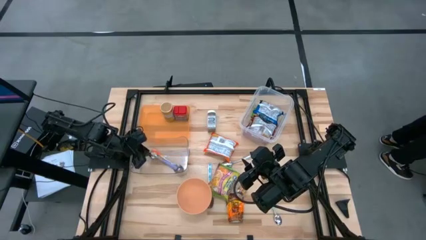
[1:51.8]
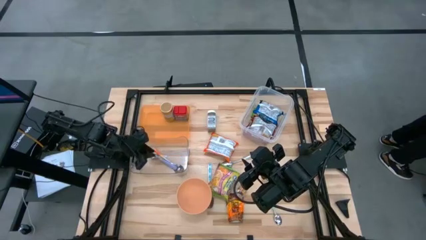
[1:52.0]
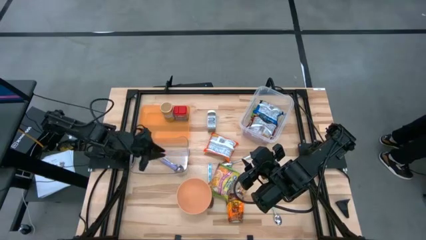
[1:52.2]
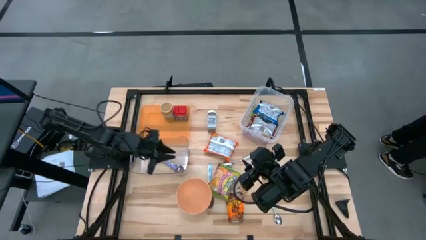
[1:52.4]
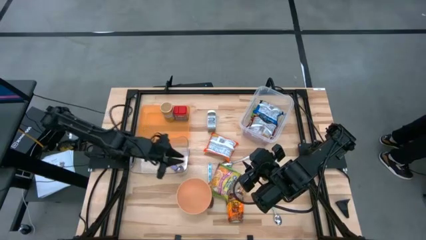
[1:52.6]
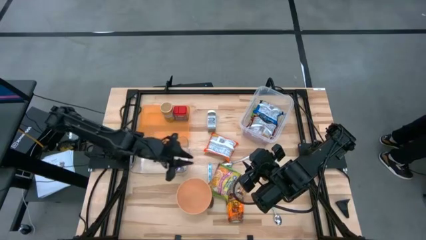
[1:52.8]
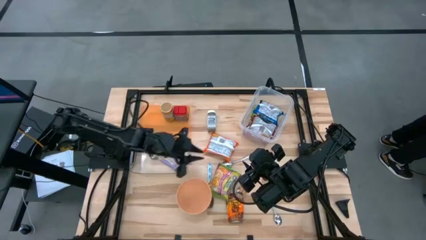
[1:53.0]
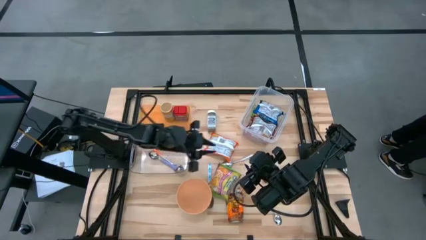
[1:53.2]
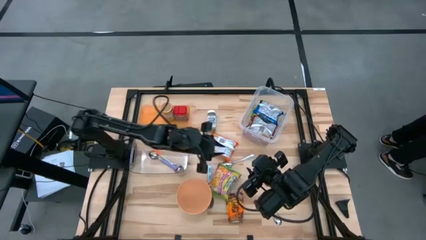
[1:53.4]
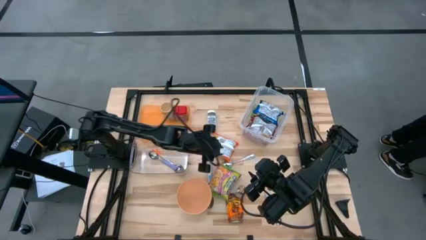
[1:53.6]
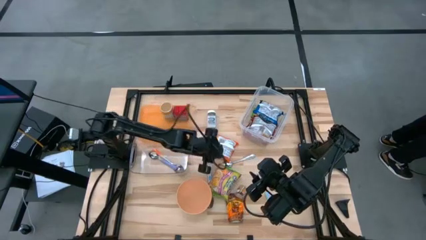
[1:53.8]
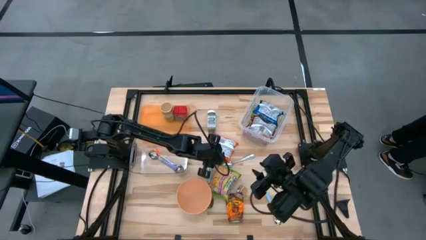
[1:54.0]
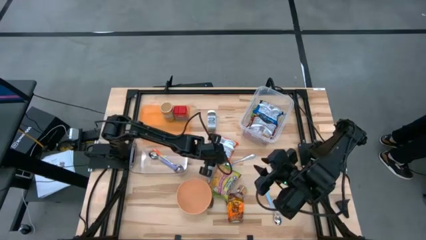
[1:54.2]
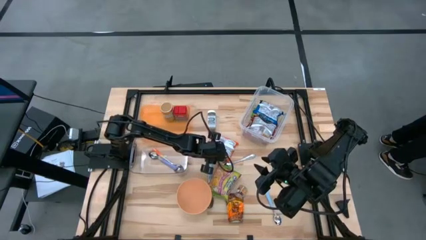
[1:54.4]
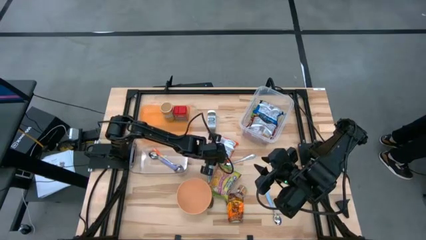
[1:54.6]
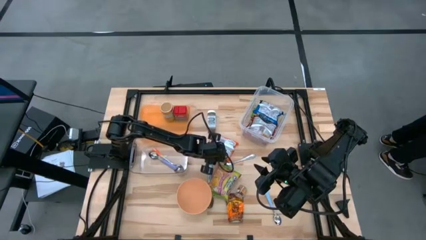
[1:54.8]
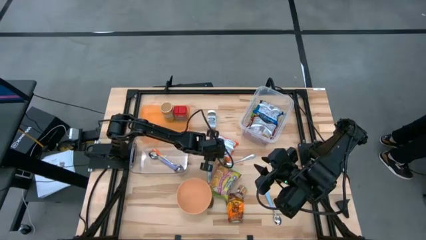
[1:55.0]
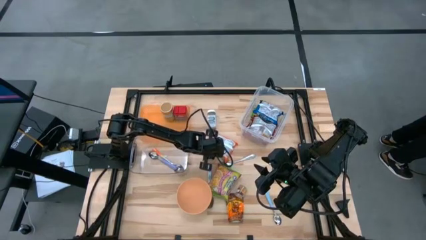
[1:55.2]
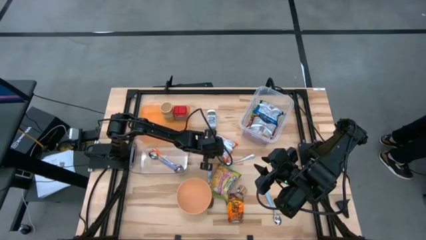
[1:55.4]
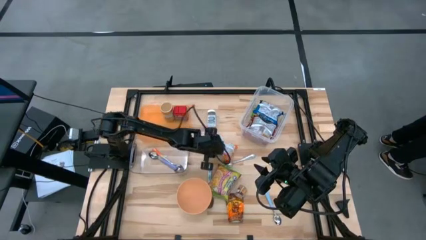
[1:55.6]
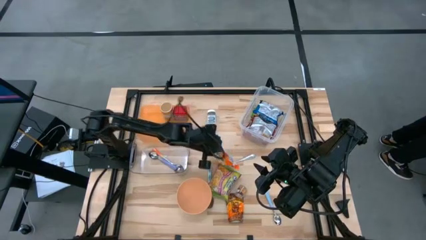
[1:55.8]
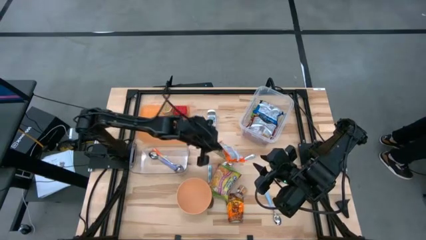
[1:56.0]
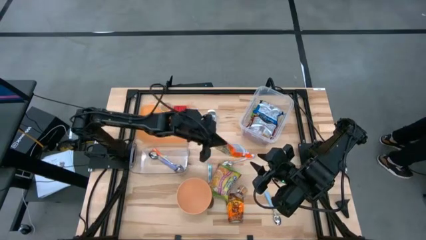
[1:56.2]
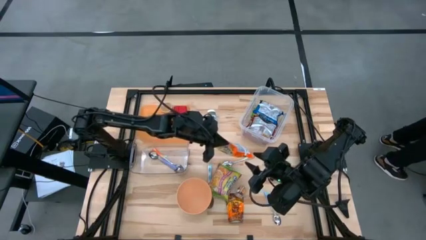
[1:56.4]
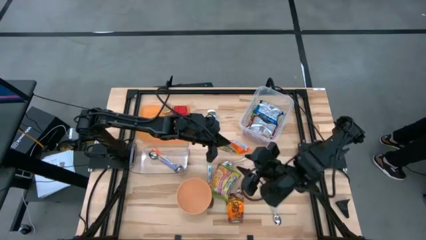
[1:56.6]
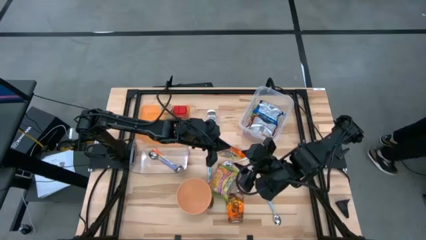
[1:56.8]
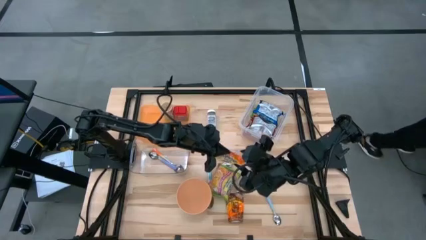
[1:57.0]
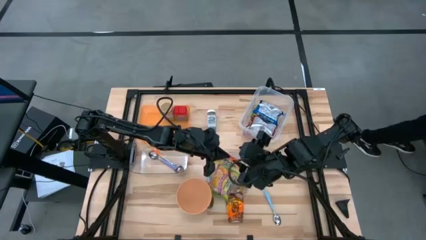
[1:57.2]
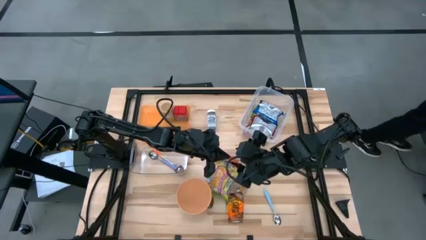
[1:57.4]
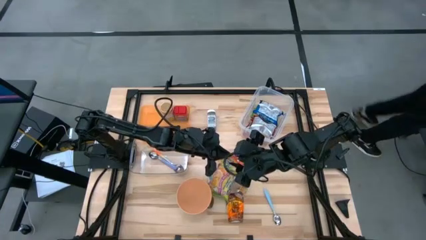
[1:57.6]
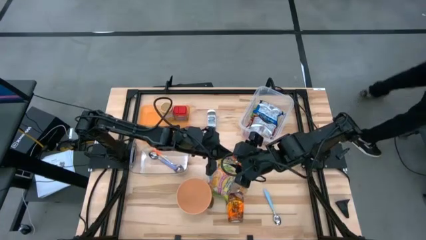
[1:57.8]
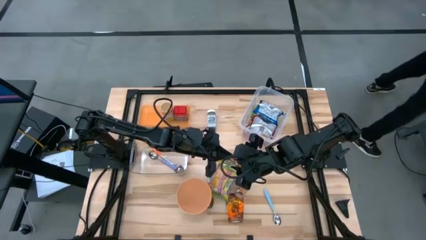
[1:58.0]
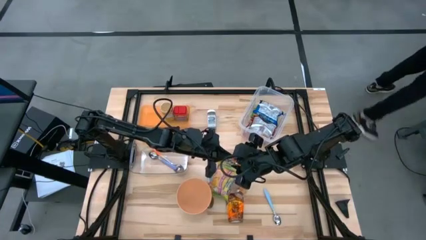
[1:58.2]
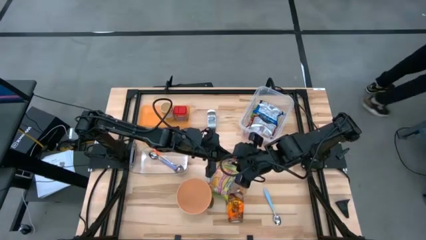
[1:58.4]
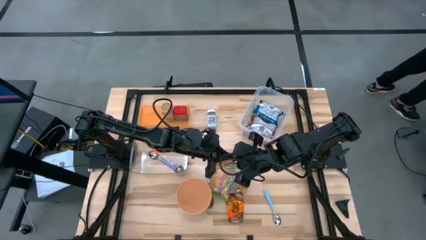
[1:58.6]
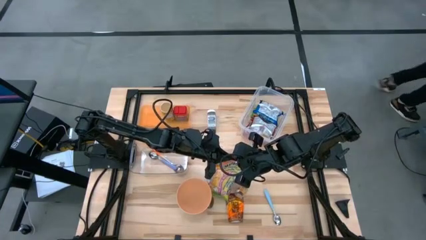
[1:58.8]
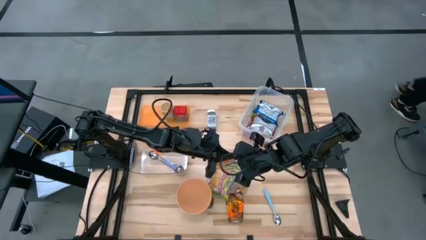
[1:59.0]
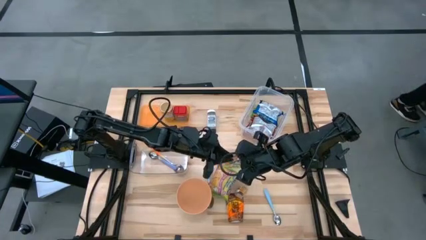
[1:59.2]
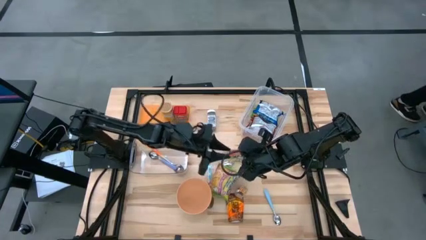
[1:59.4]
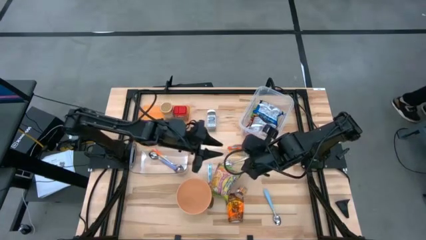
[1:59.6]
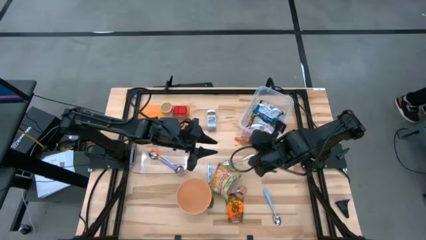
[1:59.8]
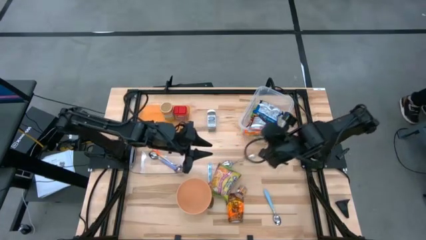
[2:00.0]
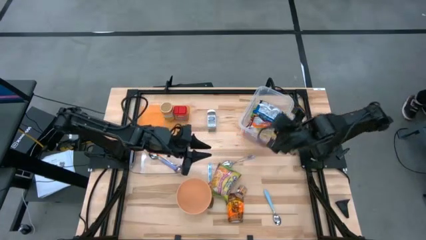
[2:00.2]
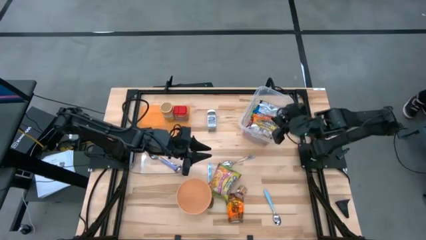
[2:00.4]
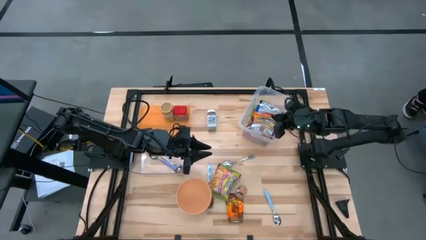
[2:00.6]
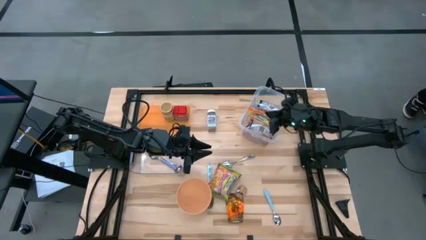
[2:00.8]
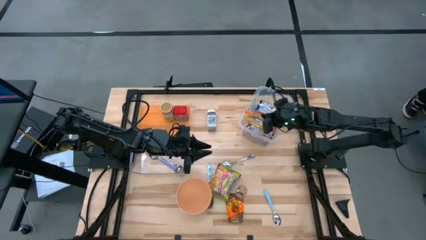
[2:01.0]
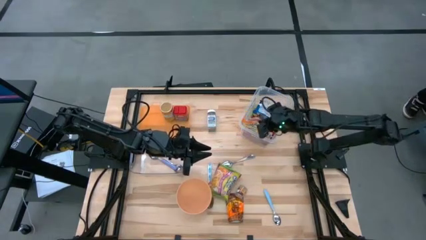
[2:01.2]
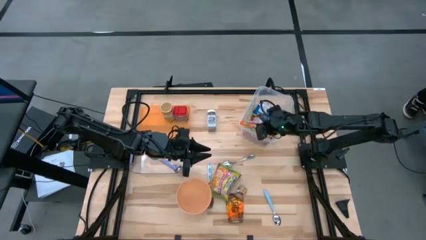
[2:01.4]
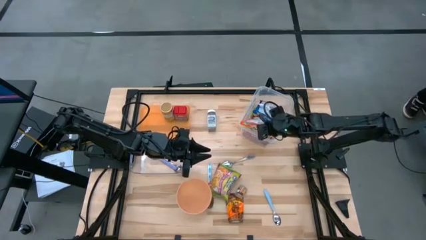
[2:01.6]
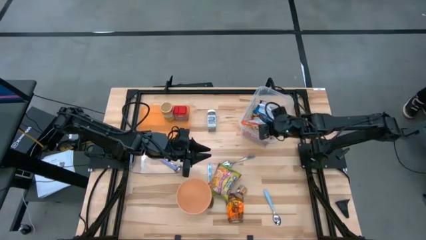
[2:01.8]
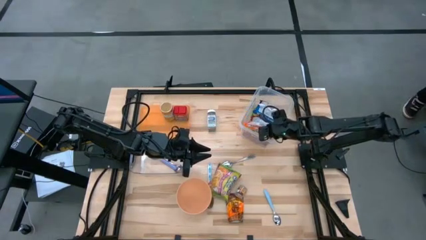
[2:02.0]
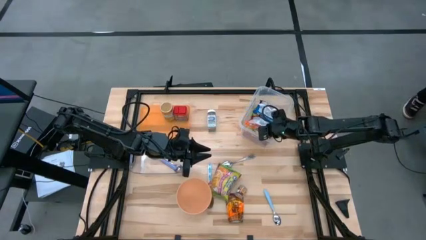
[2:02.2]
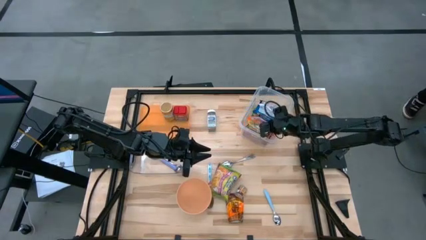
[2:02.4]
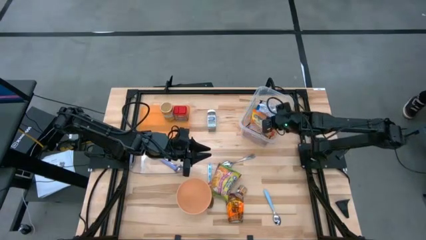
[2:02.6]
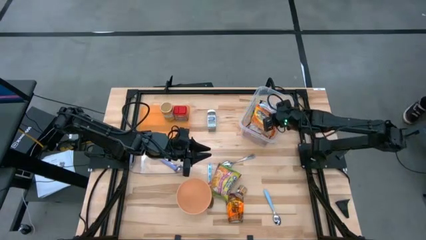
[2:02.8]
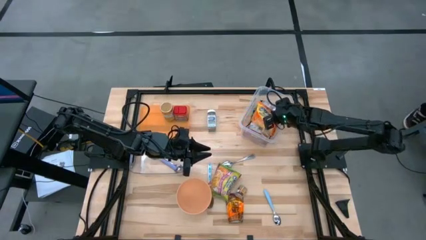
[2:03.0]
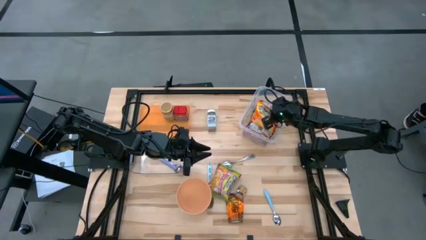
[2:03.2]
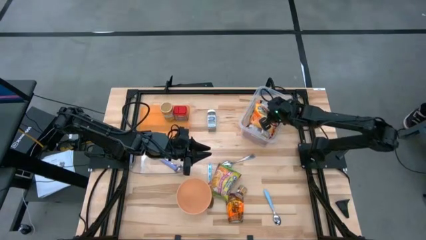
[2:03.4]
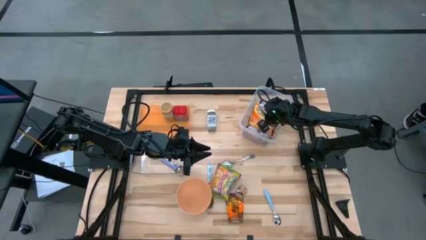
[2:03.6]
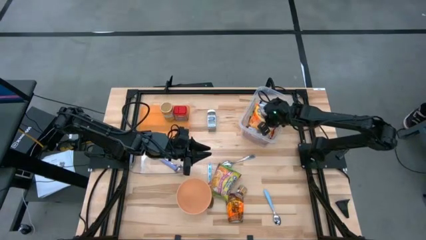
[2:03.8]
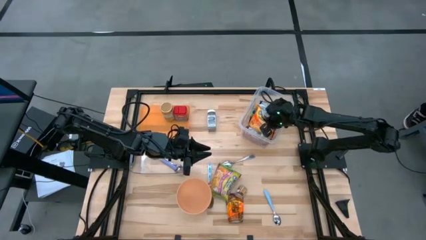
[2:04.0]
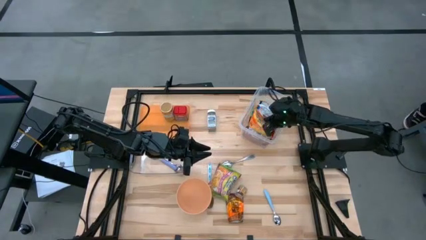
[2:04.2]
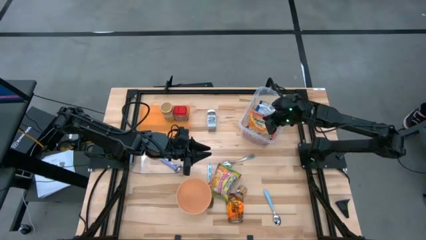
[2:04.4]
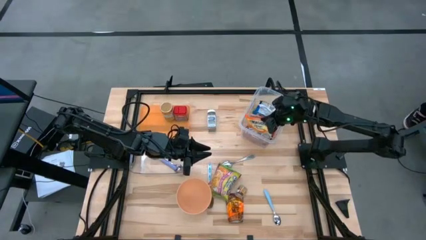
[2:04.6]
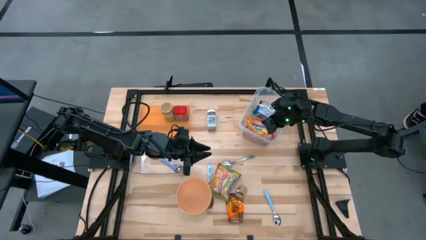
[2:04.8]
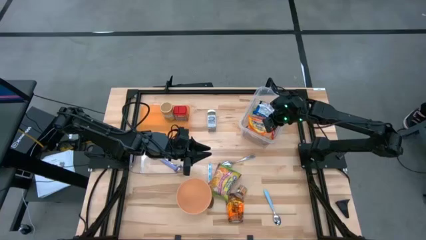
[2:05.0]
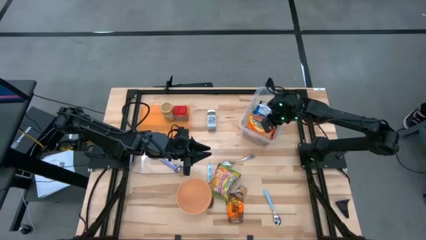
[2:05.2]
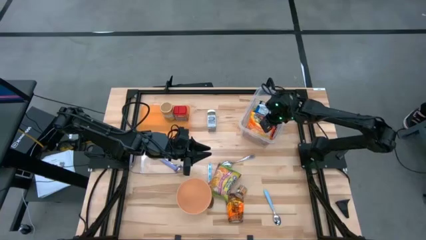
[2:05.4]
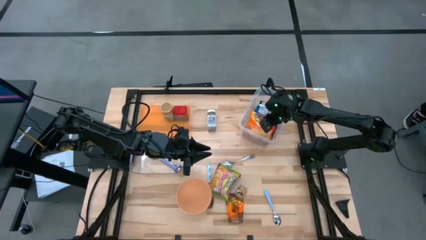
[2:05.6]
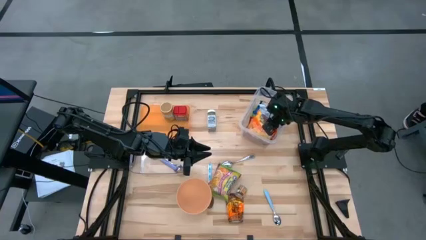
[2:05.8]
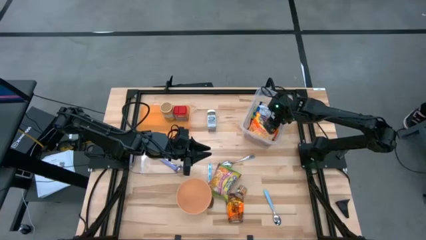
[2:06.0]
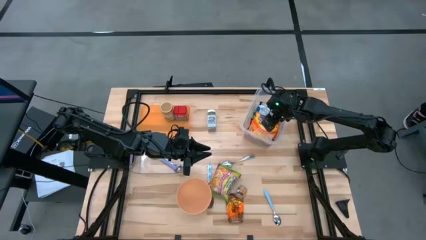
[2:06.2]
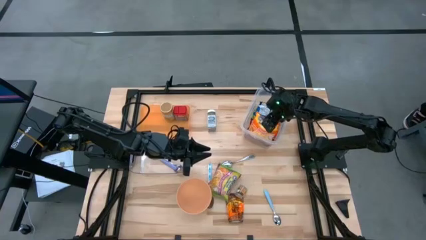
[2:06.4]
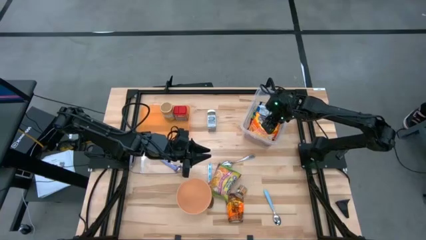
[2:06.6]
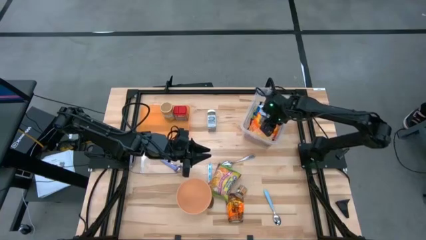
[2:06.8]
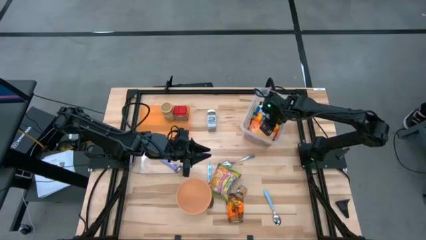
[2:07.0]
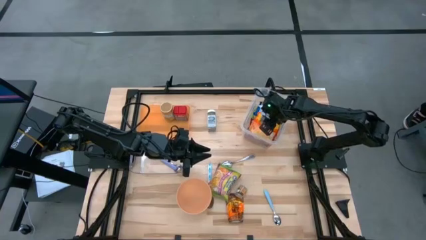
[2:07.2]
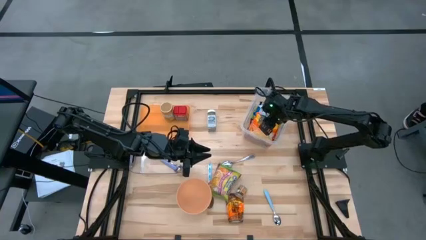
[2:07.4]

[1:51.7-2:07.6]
Task: Pick & Place Food Item
Put the orange noodle pack into the top transparent bin
